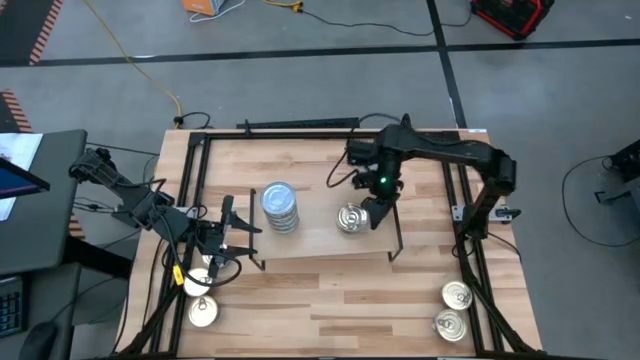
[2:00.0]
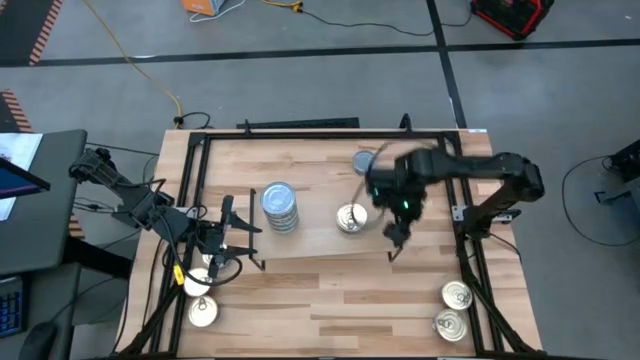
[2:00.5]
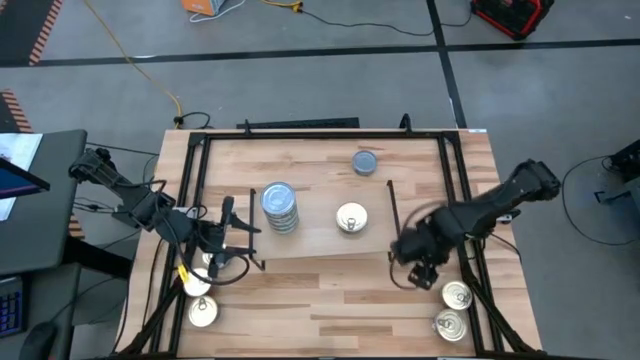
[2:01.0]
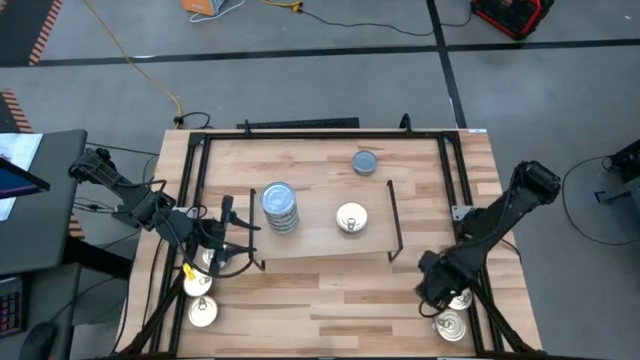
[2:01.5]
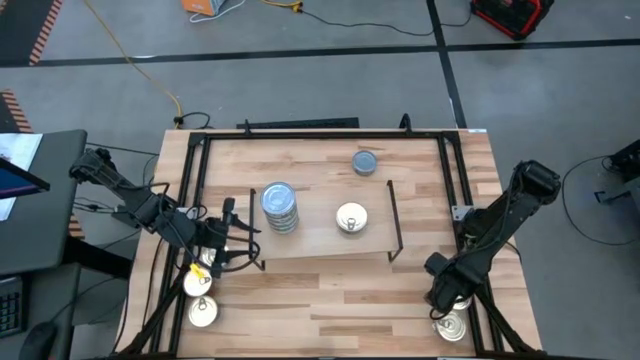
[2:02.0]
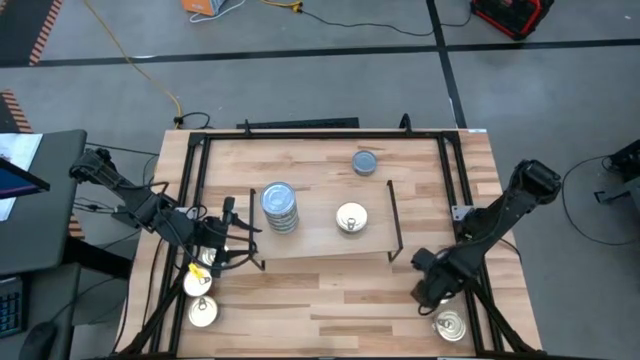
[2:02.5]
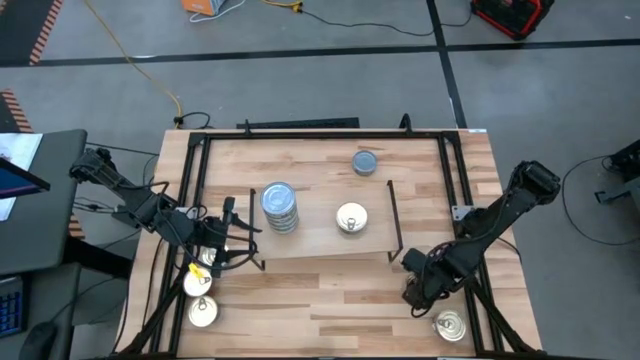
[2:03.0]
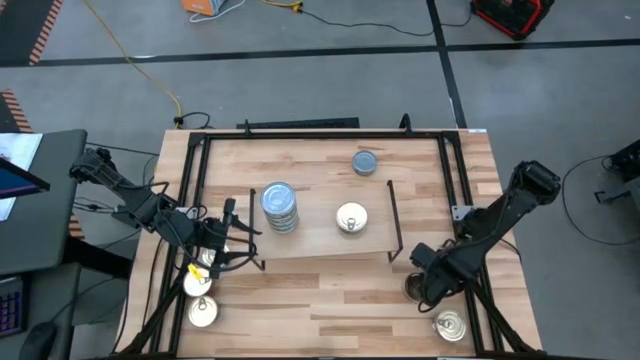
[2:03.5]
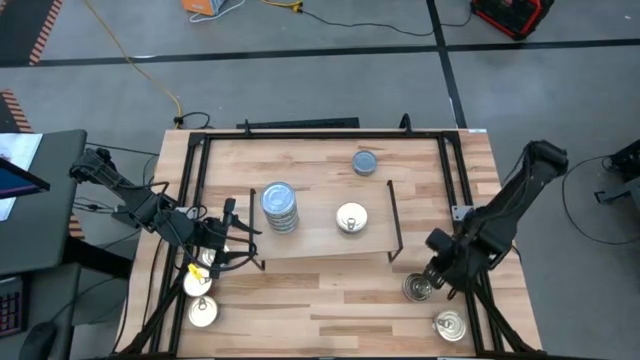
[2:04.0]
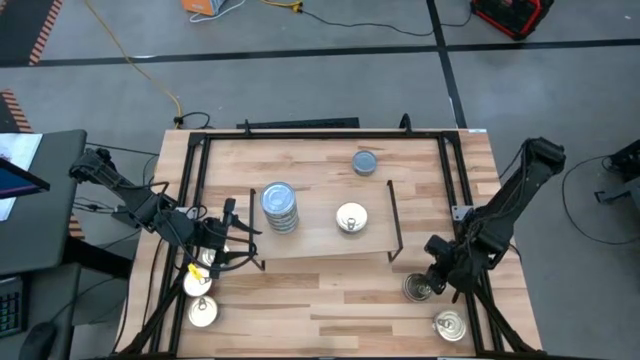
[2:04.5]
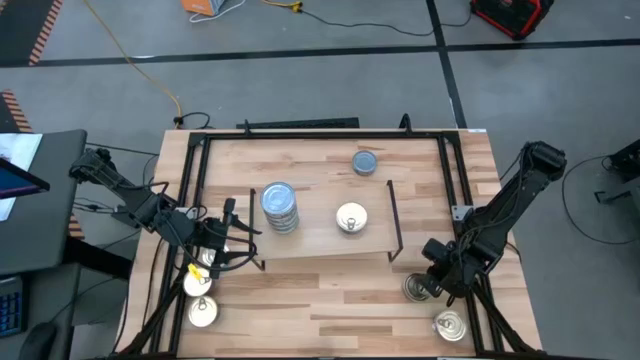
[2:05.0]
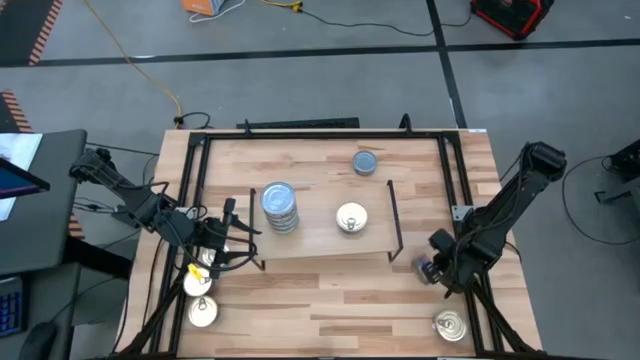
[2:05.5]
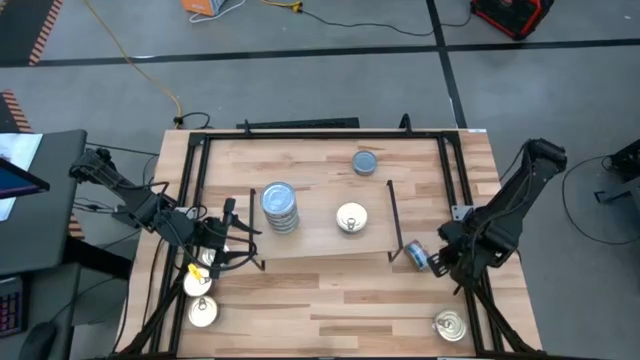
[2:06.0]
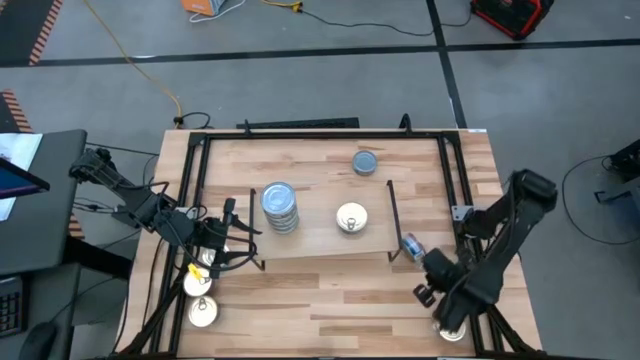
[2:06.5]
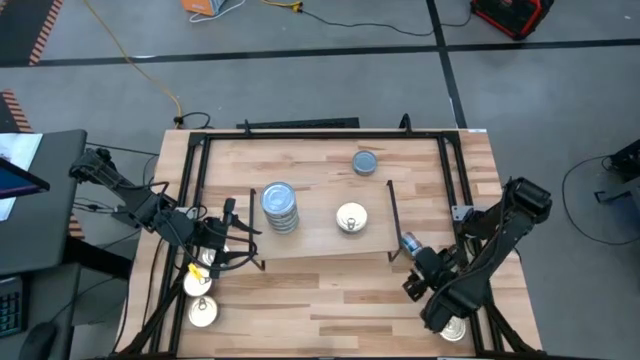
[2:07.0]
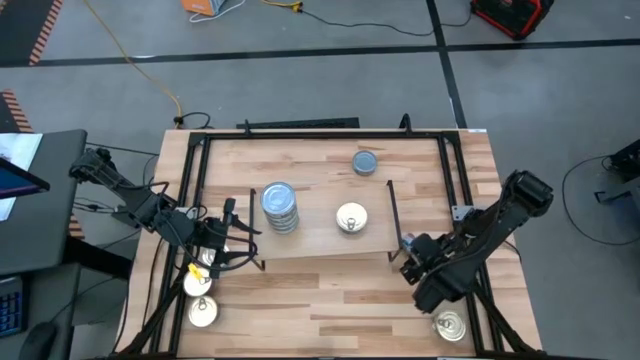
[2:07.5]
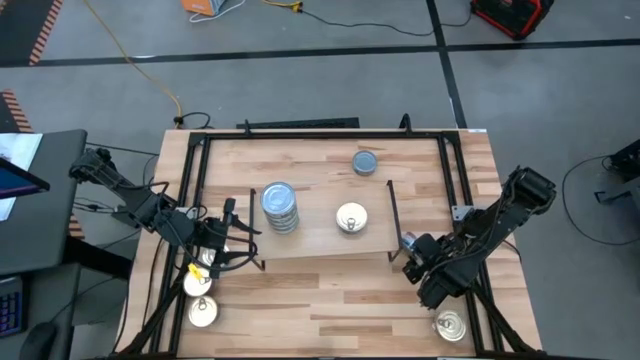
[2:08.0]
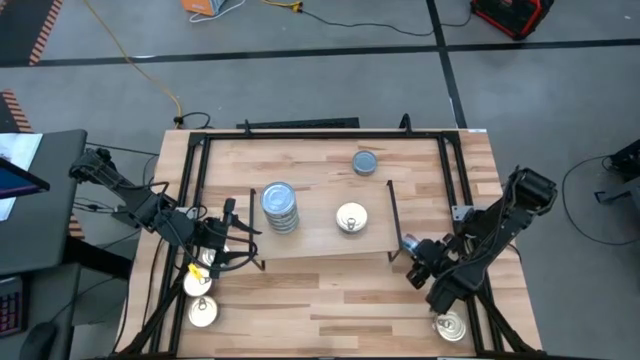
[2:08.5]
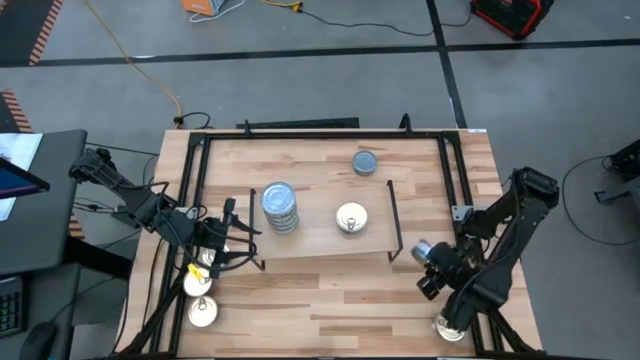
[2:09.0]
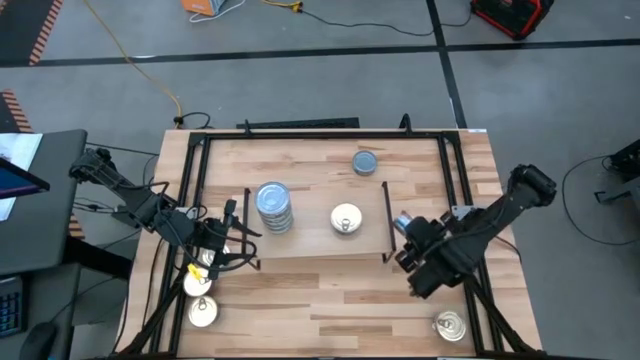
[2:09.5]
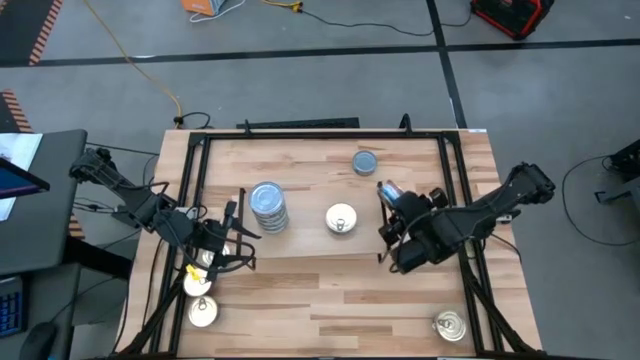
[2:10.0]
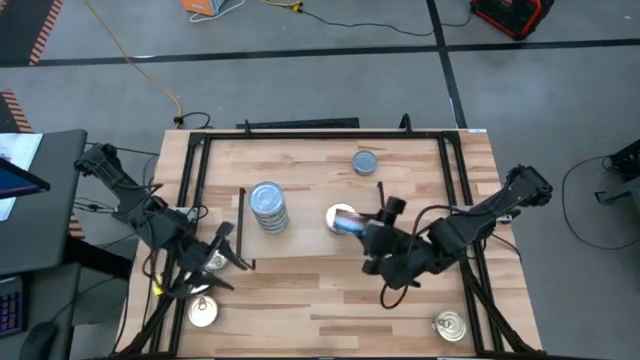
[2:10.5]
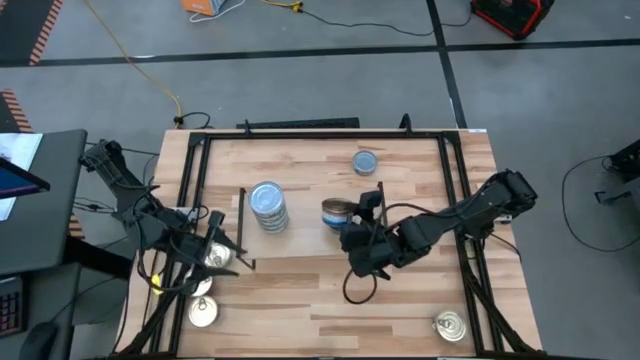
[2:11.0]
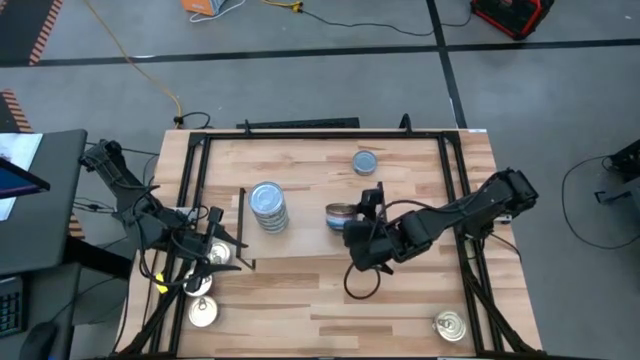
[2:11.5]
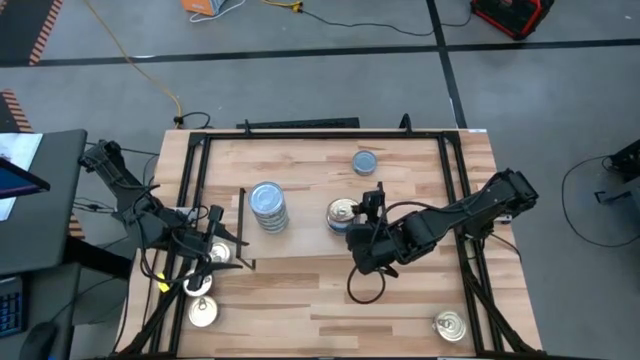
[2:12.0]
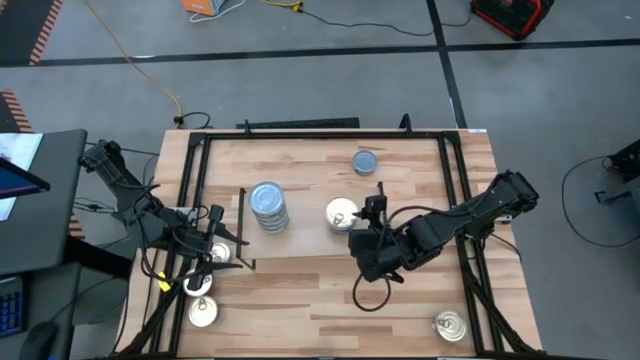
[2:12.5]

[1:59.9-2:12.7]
Task: Stack canned seafood by type on shelf
Stack the blue tuna can on top of the blue tuna can on the shelf

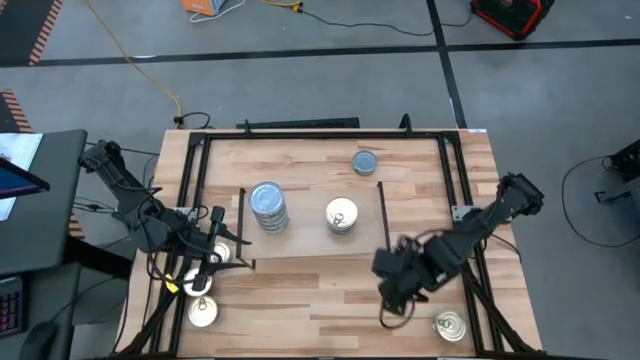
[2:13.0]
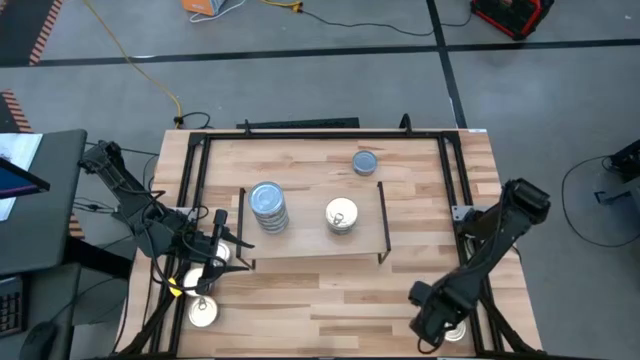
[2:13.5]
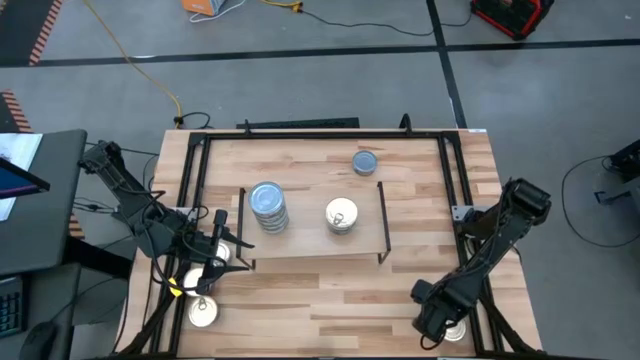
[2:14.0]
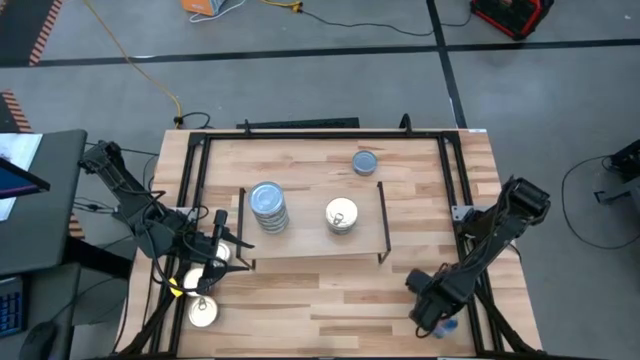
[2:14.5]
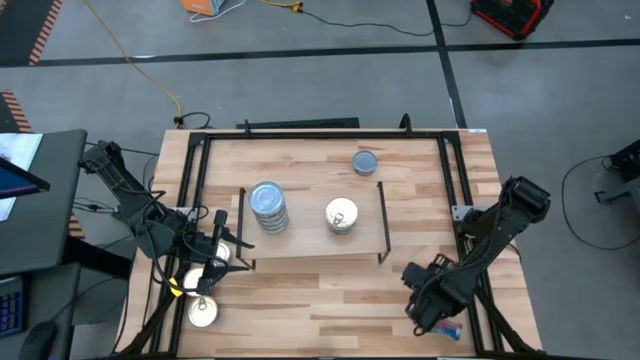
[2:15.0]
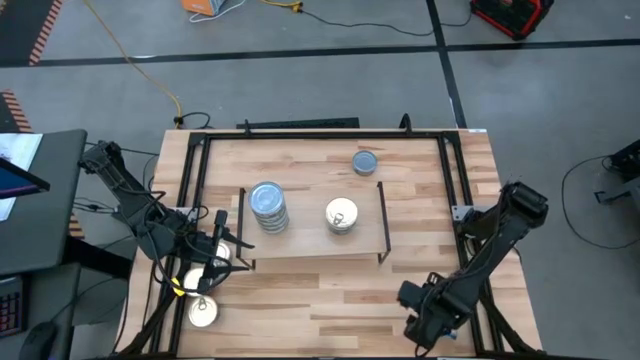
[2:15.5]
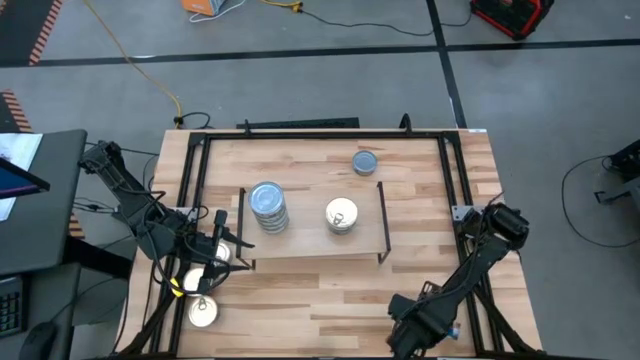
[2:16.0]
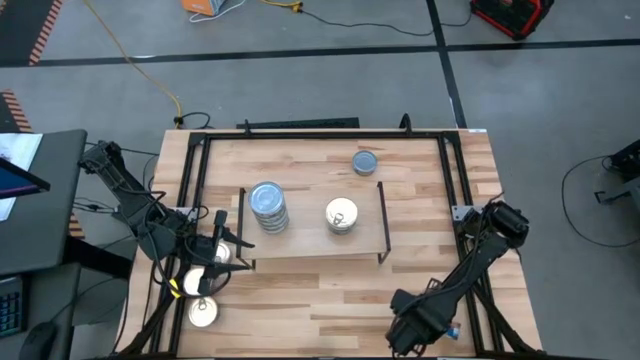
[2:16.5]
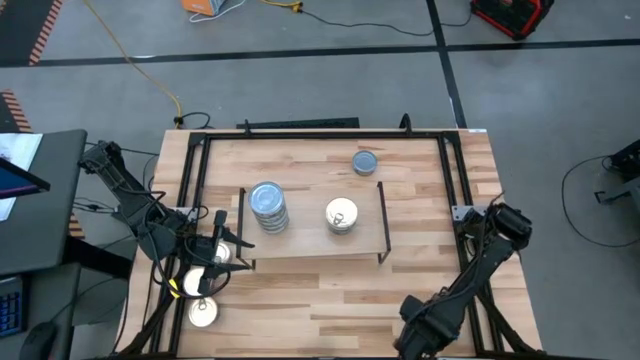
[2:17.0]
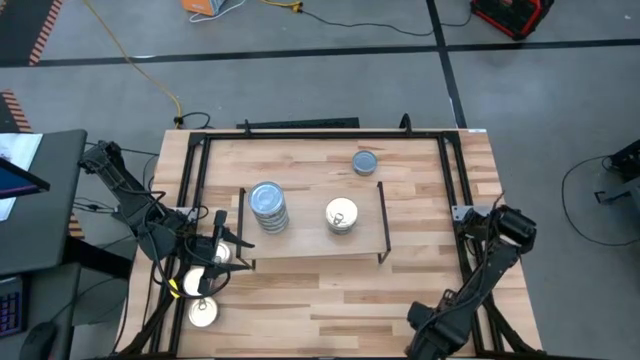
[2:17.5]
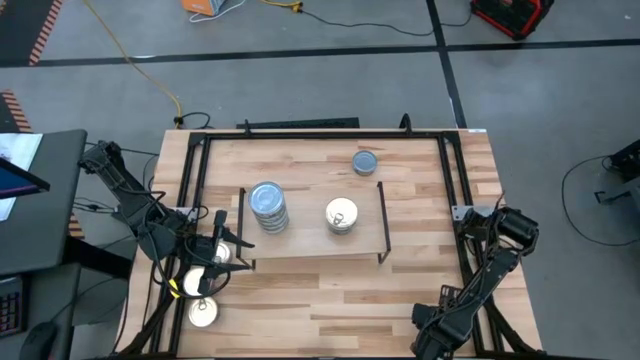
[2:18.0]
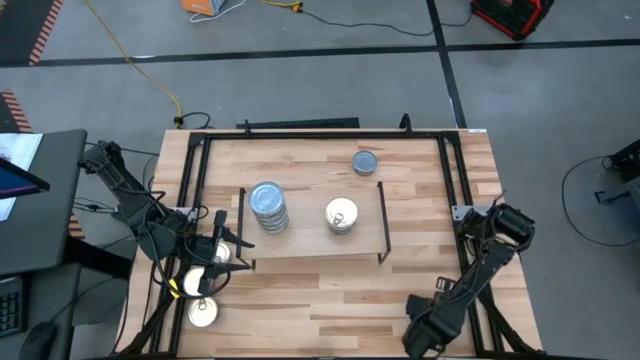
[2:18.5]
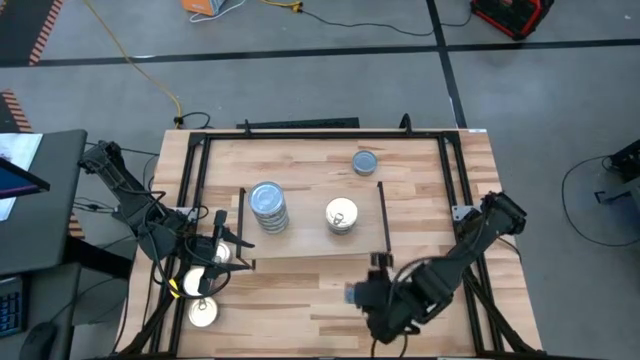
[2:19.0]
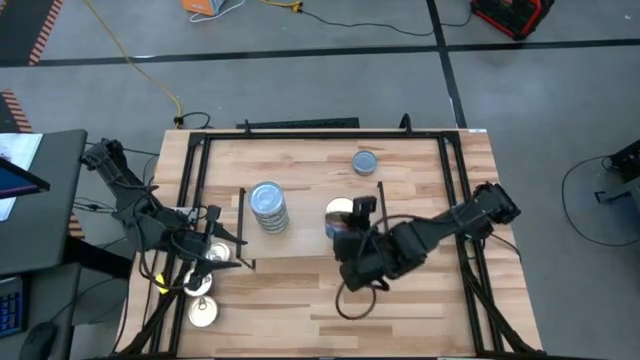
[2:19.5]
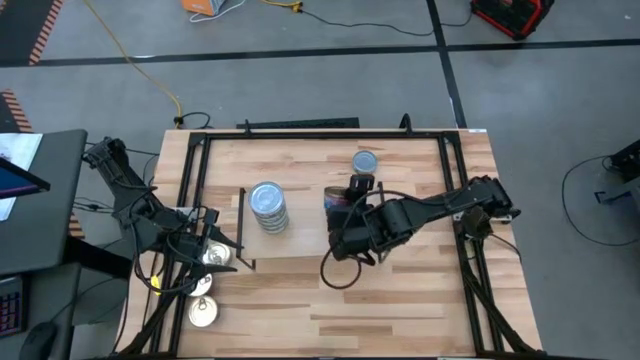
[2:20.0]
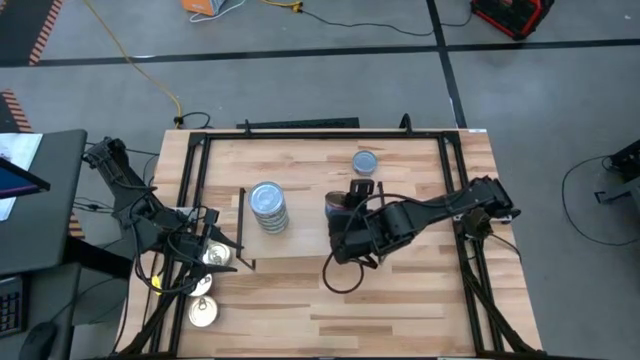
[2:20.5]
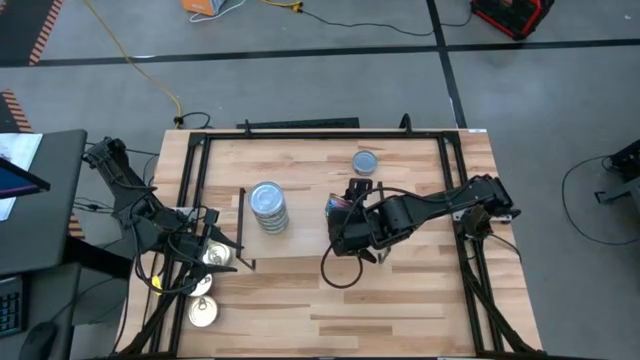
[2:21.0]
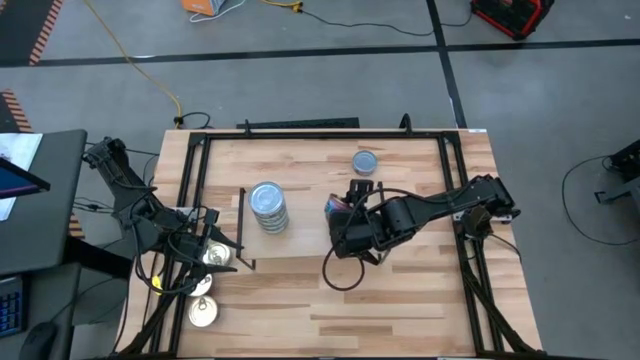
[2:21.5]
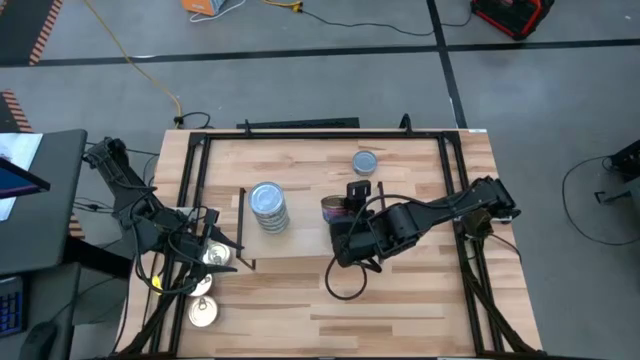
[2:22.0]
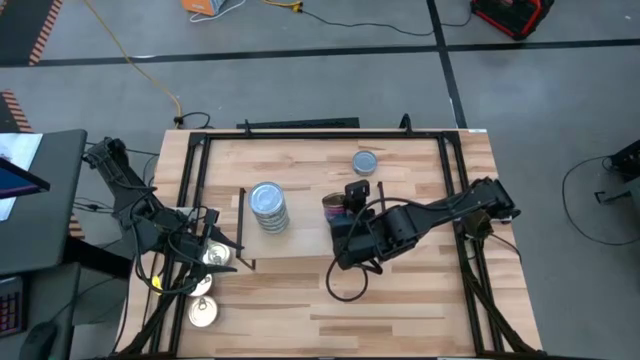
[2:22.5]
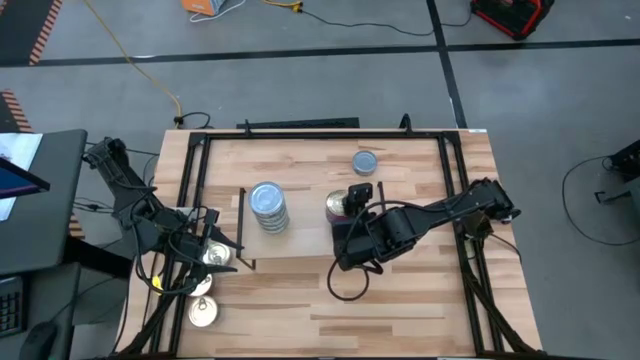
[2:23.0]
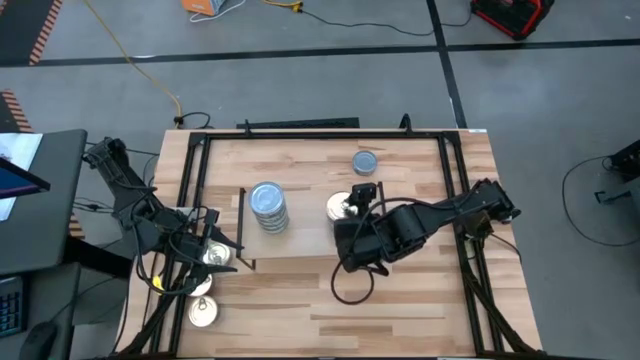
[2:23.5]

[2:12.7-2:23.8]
Stack the blue tuna can on top of the blue tuna can on the shelf
